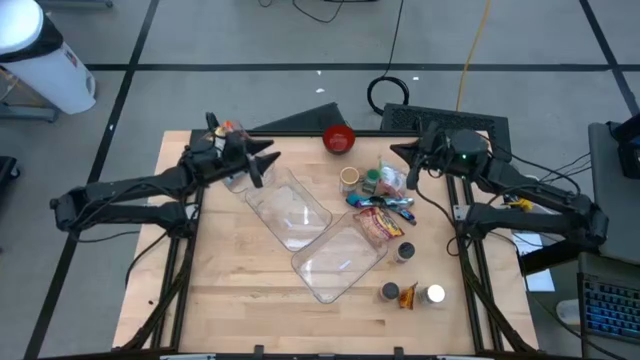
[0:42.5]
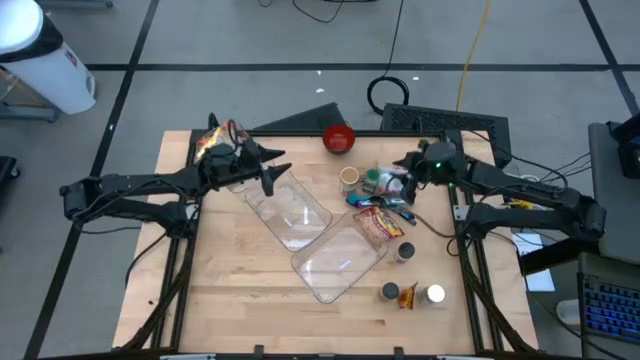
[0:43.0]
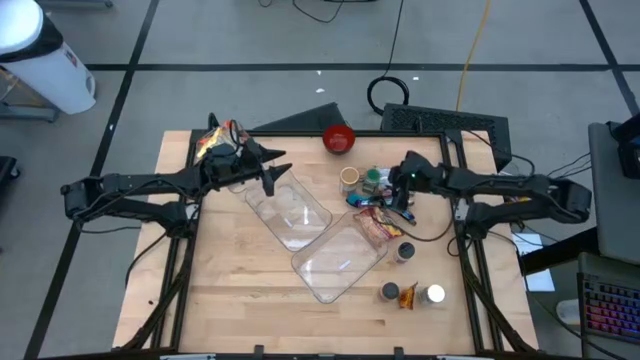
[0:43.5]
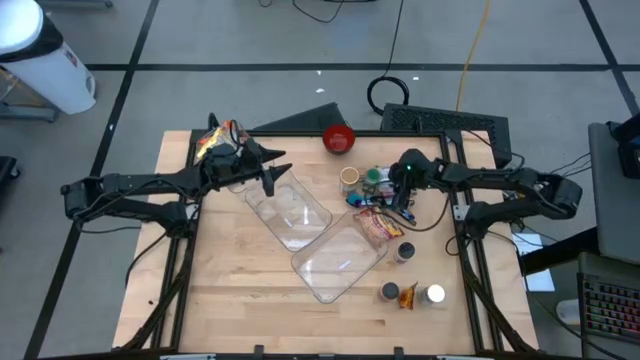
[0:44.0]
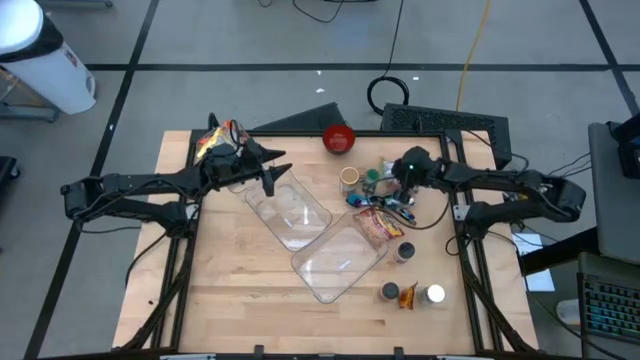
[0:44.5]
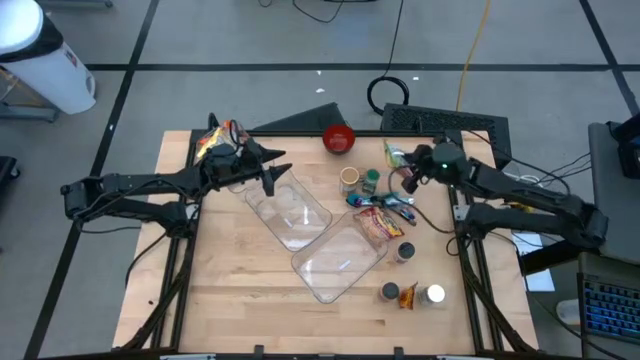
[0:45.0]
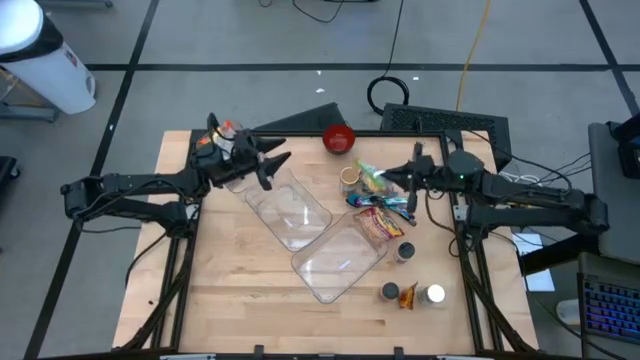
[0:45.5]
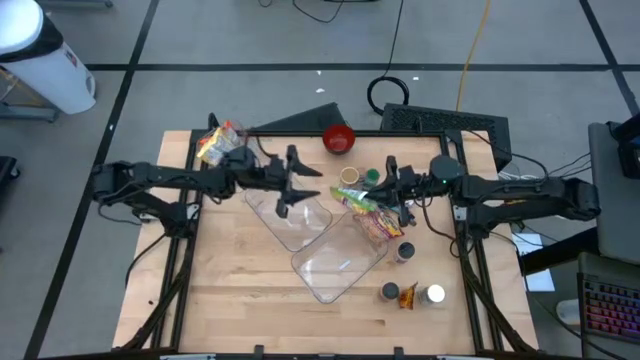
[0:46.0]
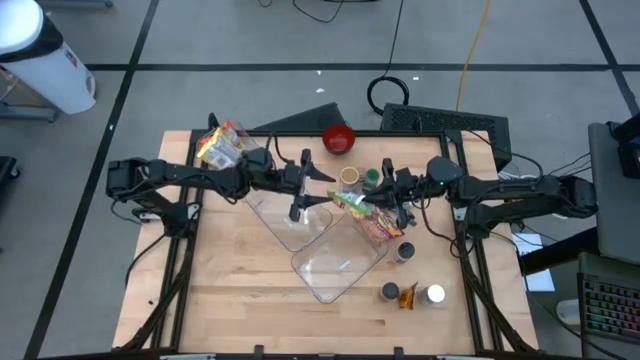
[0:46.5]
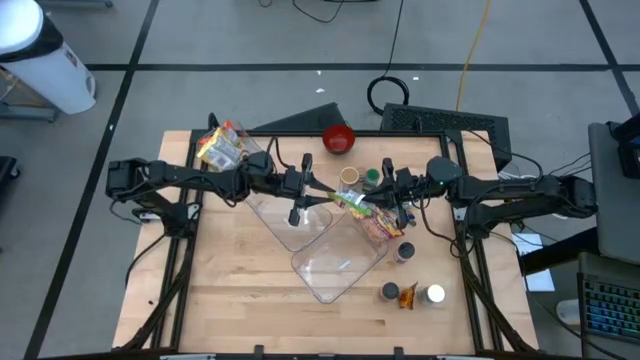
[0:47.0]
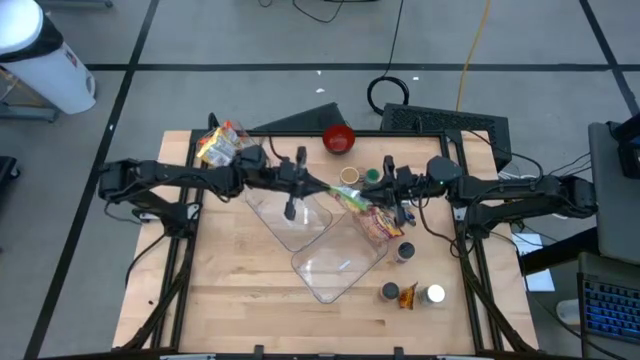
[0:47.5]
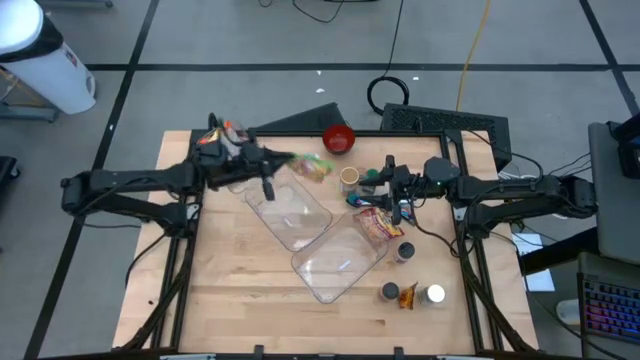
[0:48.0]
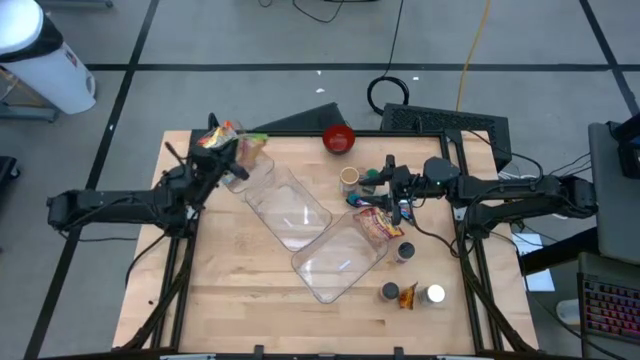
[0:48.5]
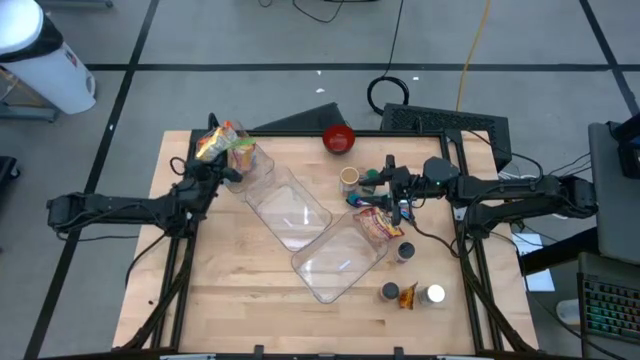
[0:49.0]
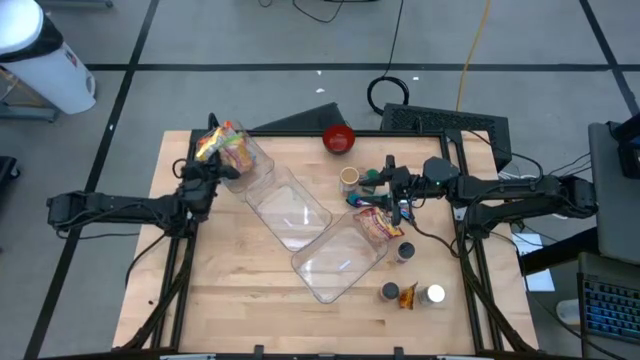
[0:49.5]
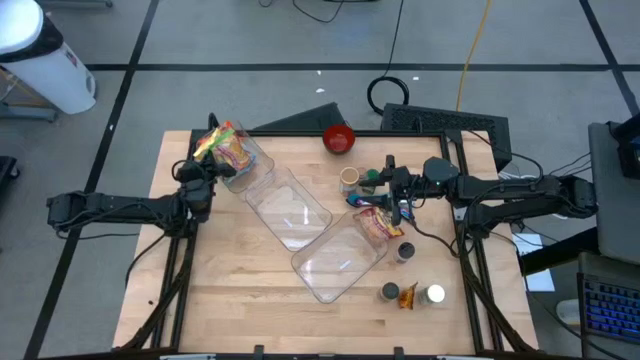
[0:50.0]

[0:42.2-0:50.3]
Task: Pick & Place Food Item
Put the green noodle pack into the top transparent bin

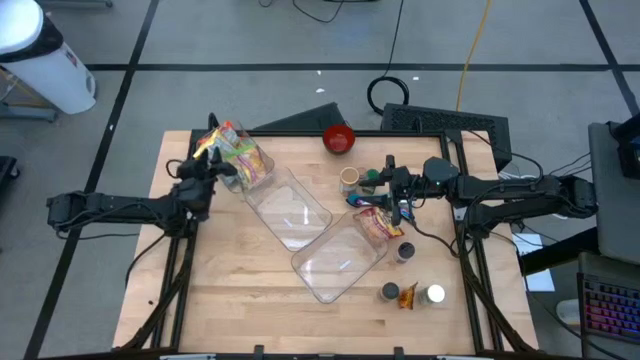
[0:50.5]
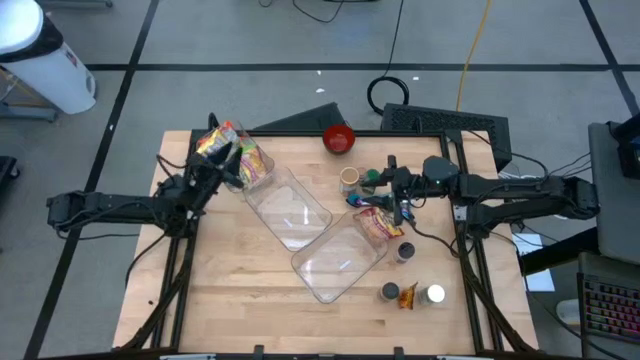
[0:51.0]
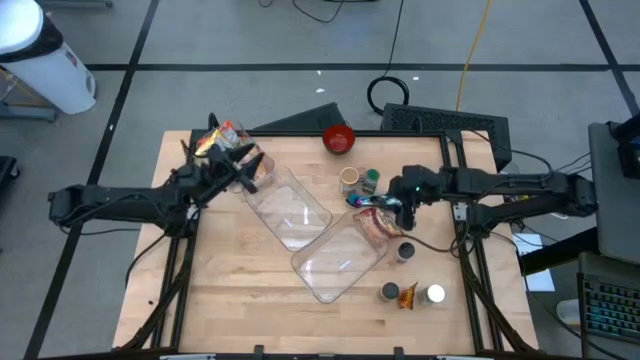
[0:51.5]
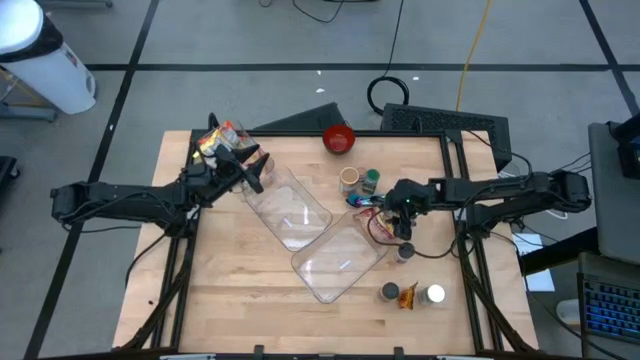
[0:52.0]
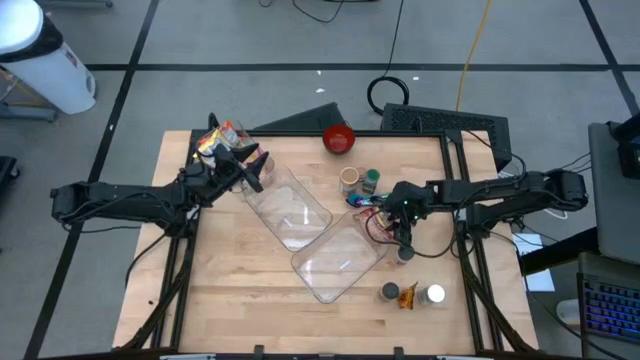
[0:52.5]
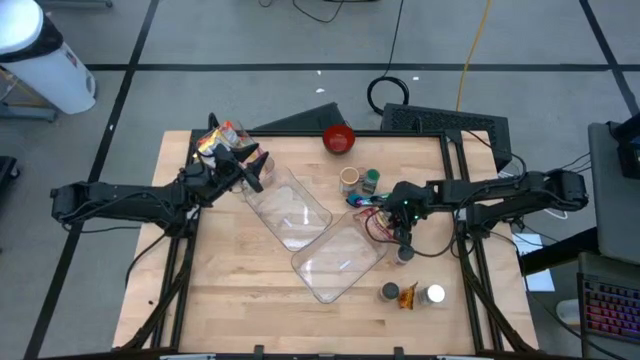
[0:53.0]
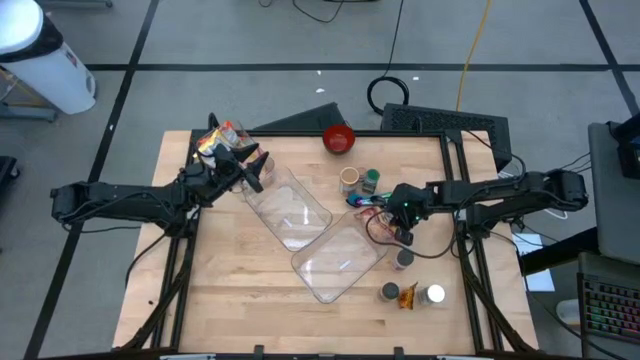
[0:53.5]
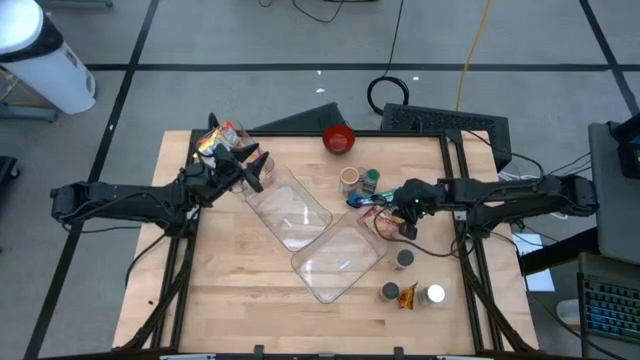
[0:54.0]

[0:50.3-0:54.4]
Put the red noodle pack into the top transparent bin

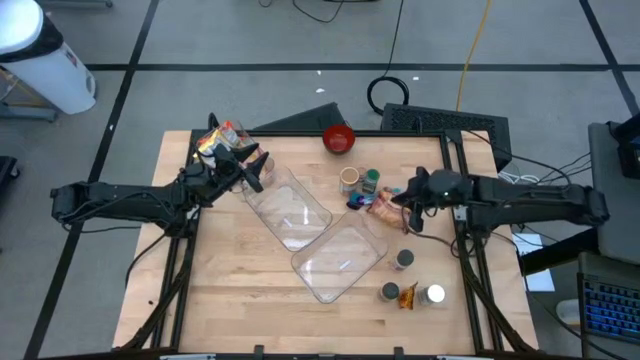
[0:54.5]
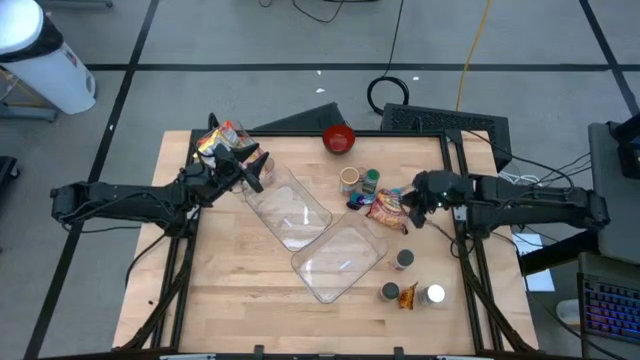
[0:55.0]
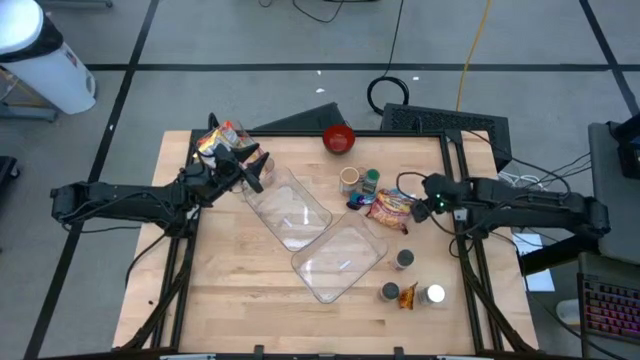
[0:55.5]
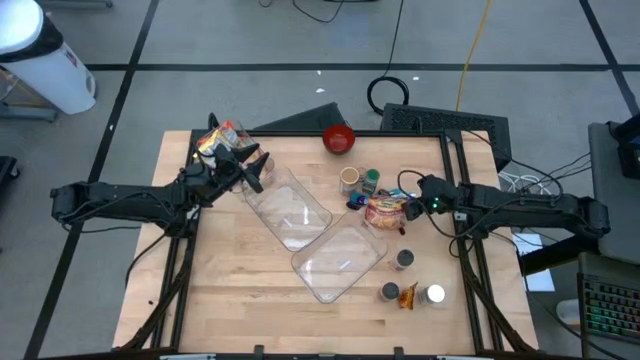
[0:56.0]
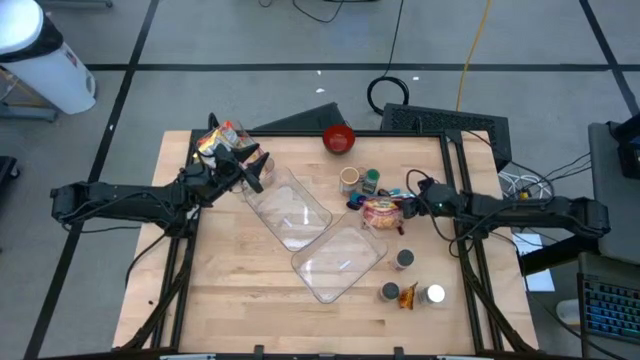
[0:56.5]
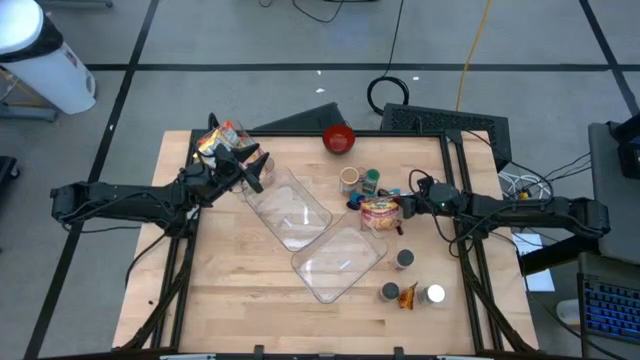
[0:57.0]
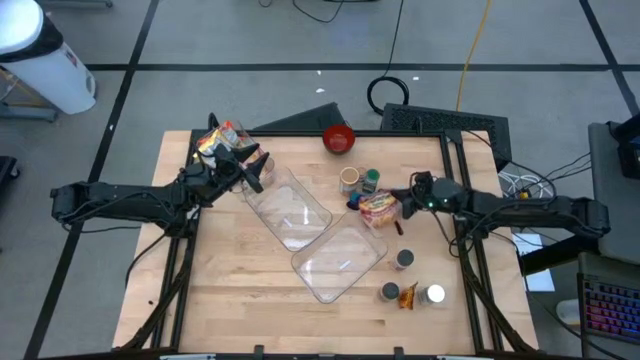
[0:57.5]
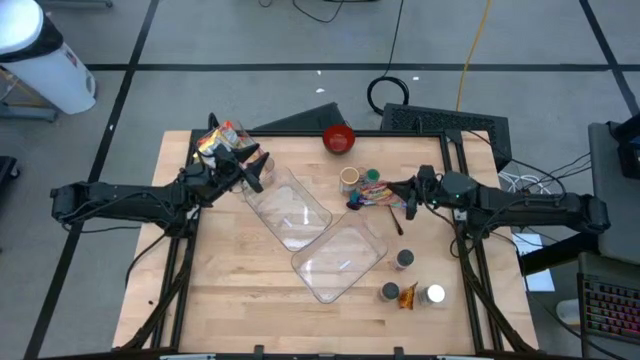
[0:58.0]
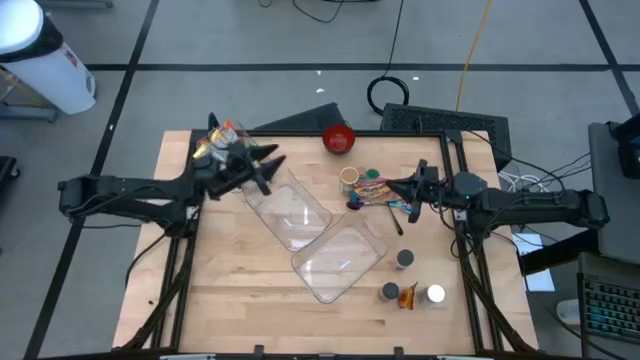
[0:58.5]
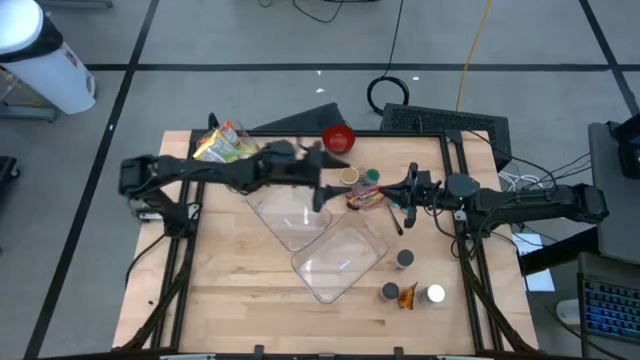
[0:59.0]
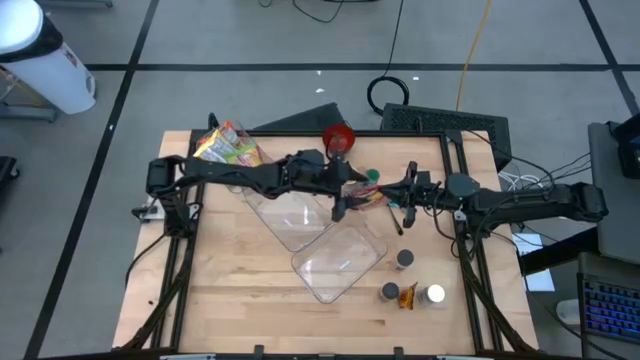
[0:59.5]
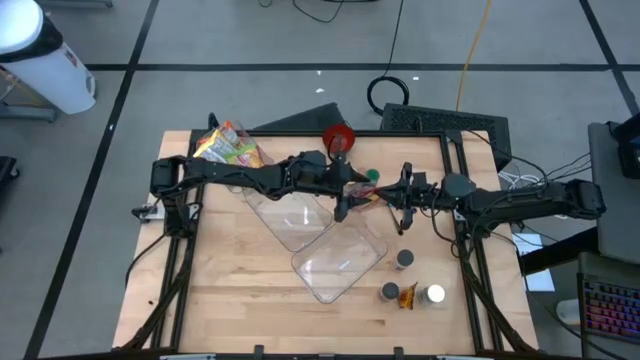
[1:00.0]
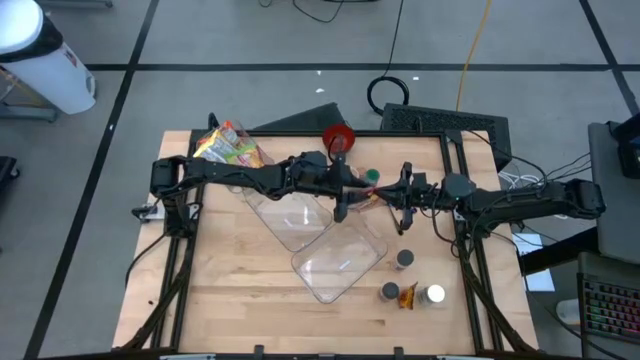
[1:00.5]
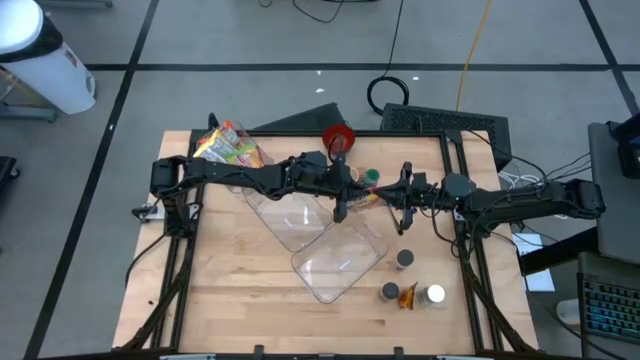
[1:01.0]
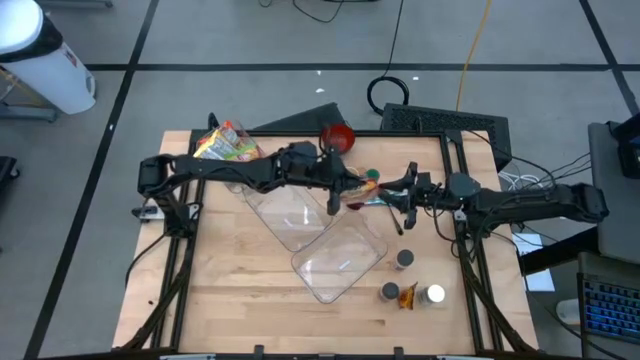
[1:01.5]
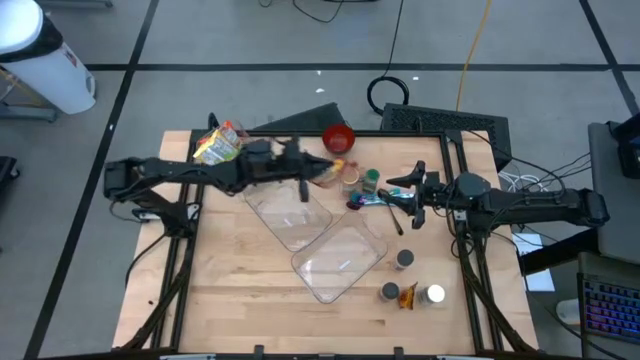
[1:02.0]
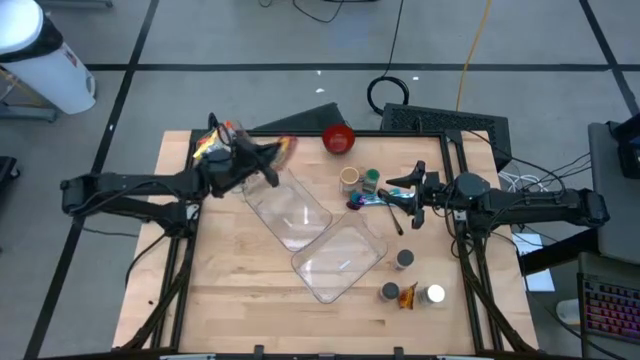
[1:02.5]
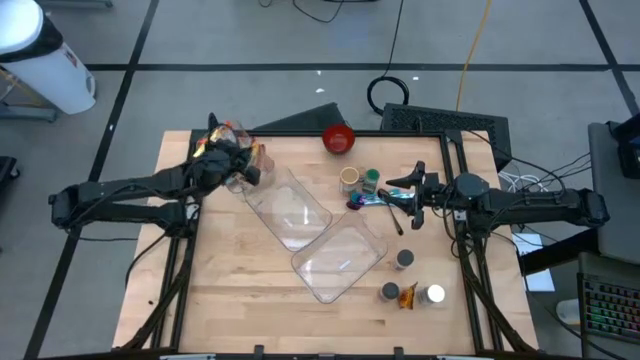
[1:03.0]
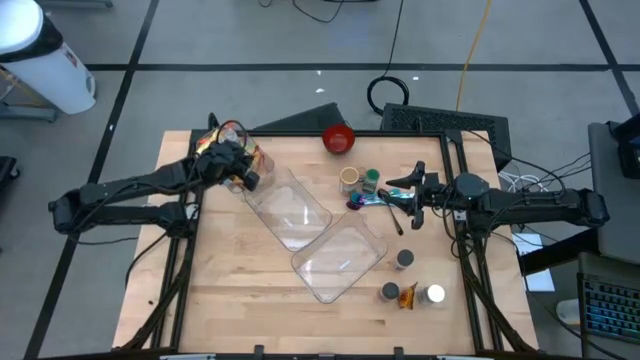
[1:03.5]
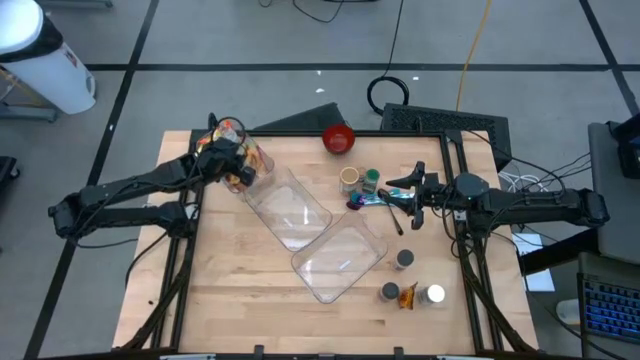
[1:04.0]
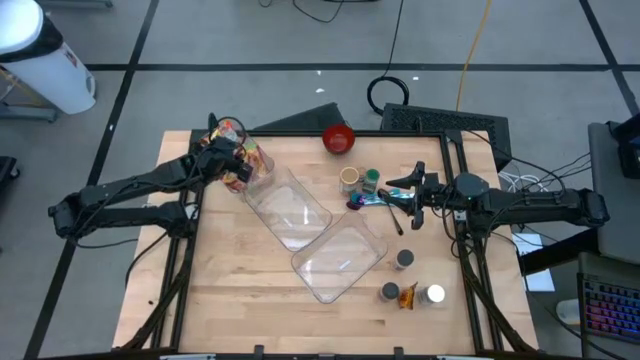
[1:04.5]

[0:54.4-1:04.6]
Put the red noodle pack into the top transparent bin
